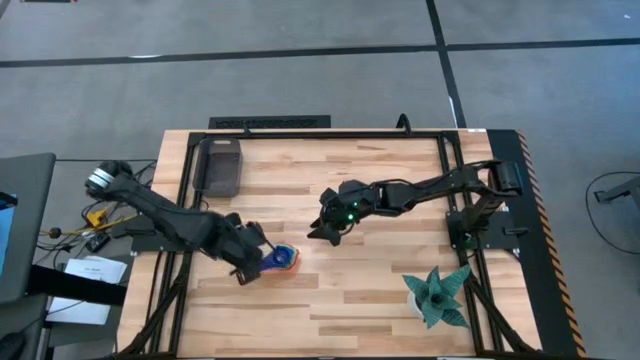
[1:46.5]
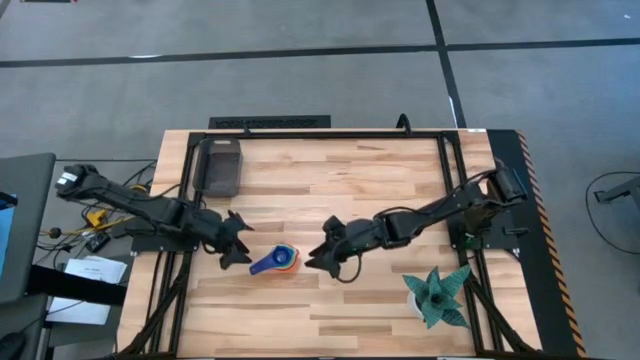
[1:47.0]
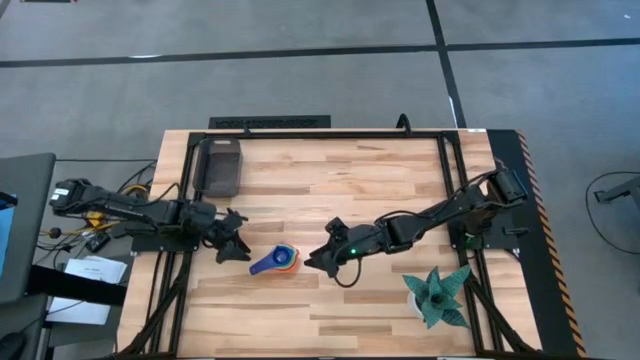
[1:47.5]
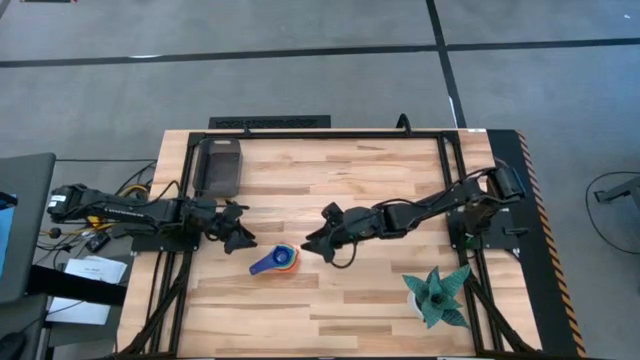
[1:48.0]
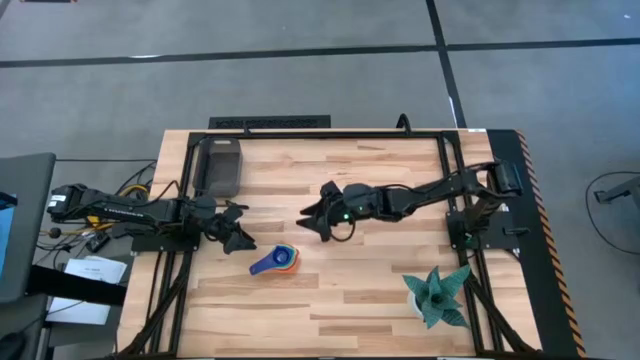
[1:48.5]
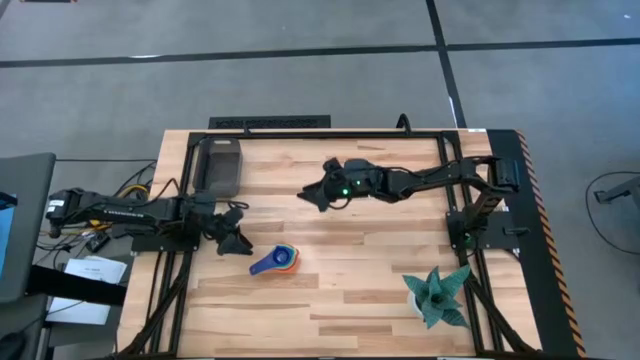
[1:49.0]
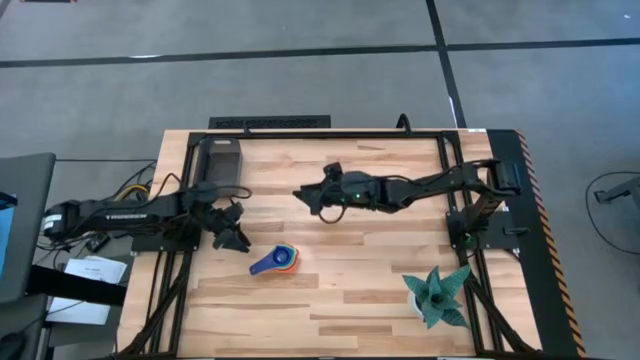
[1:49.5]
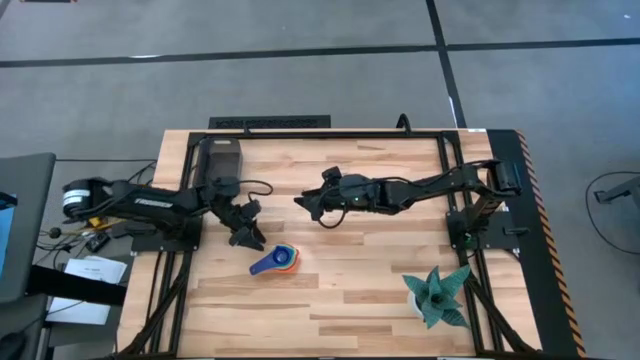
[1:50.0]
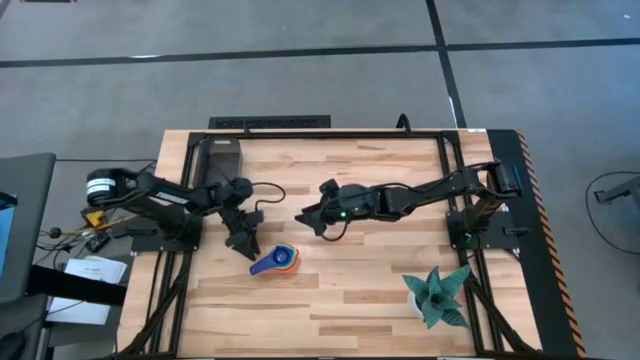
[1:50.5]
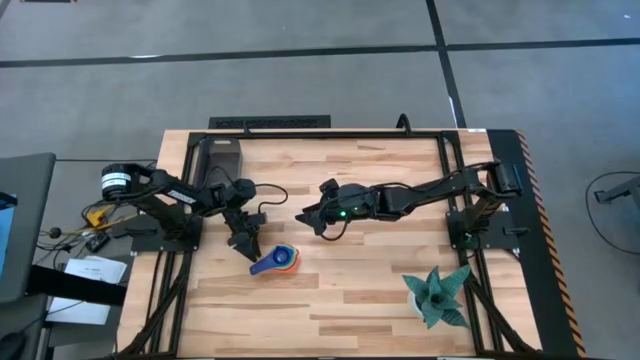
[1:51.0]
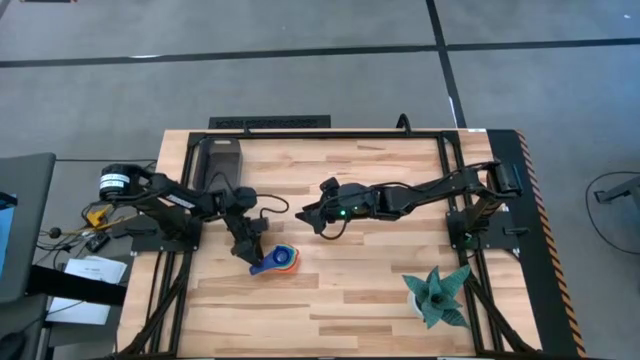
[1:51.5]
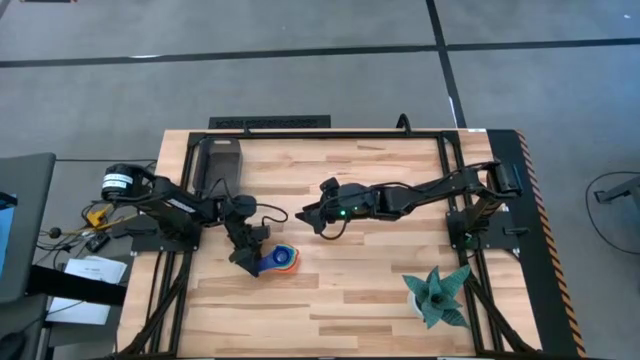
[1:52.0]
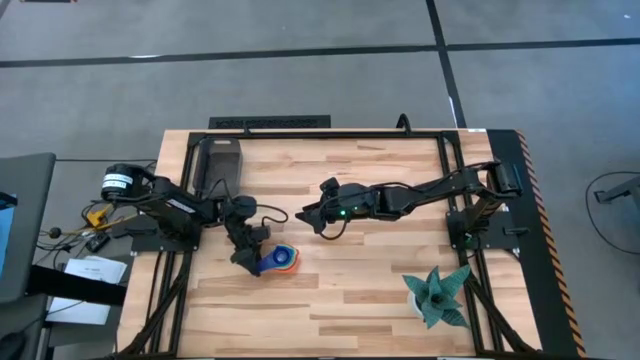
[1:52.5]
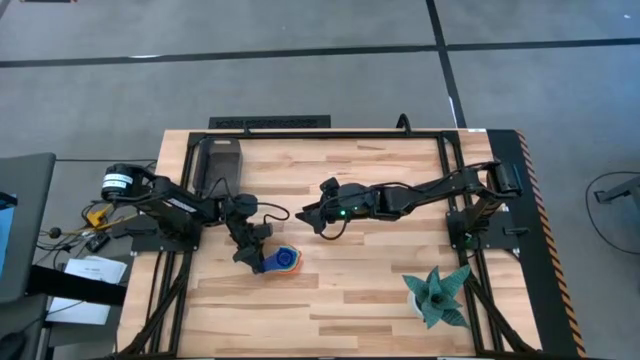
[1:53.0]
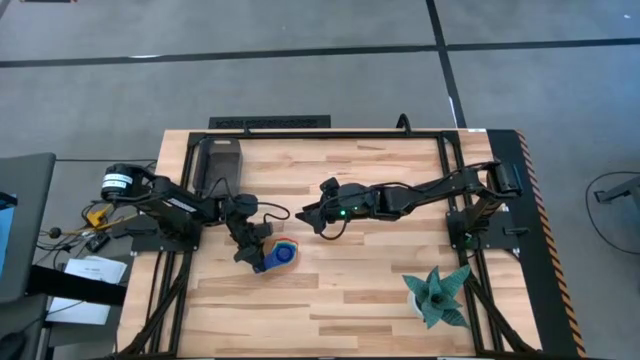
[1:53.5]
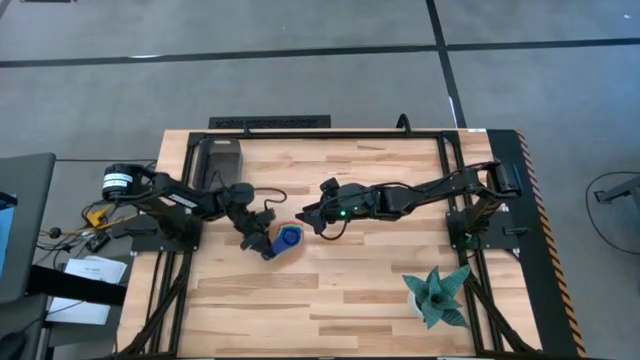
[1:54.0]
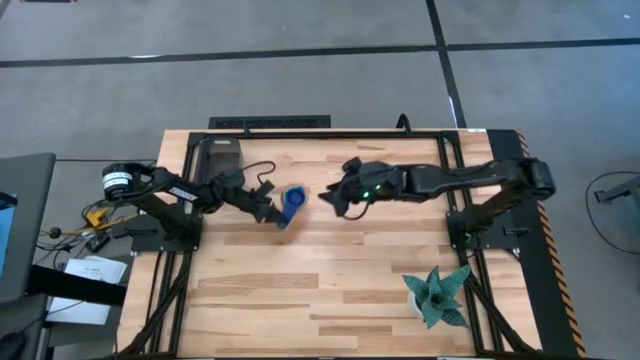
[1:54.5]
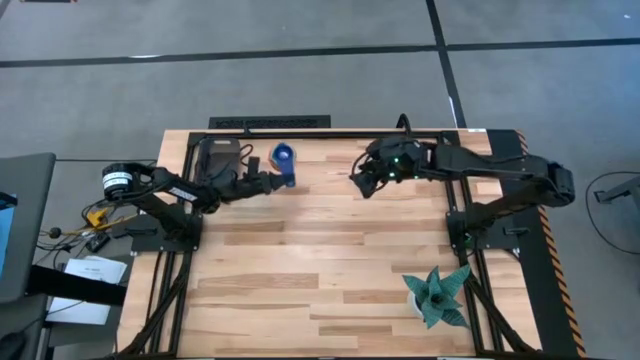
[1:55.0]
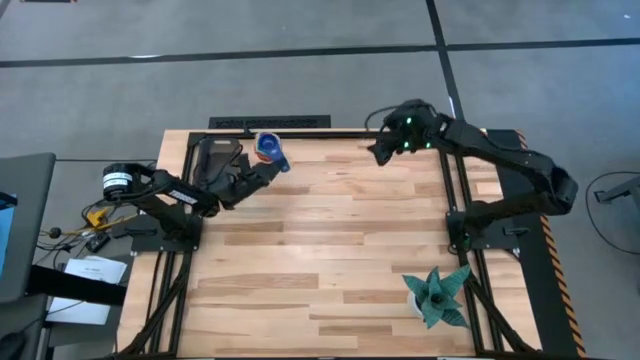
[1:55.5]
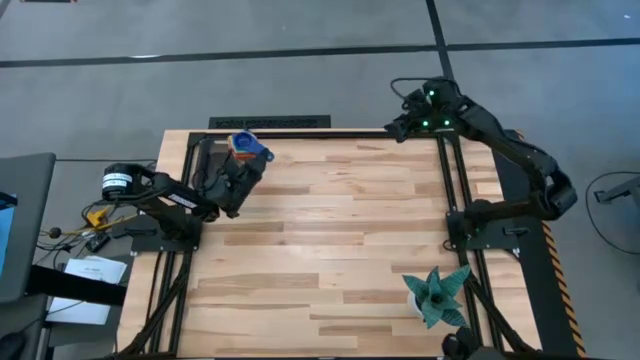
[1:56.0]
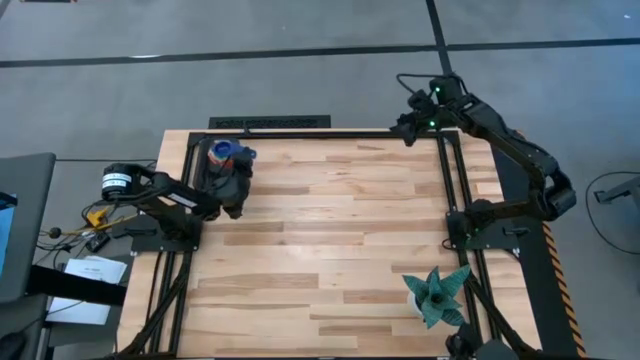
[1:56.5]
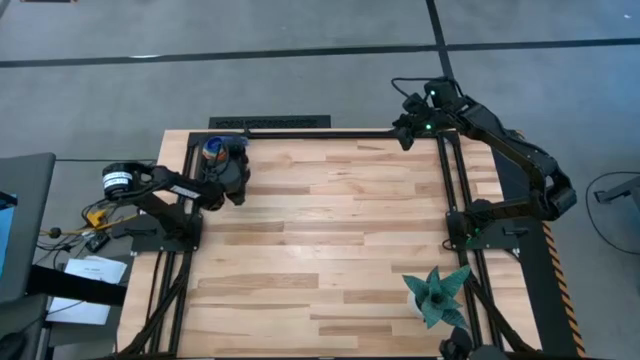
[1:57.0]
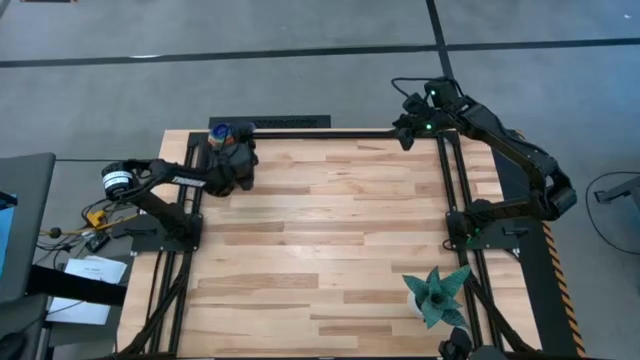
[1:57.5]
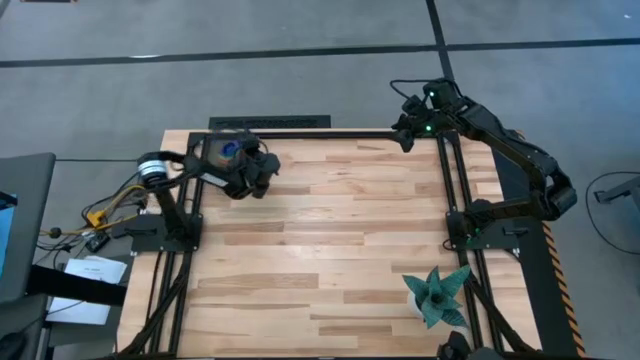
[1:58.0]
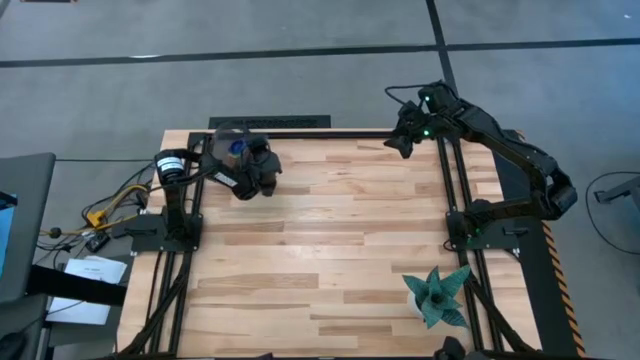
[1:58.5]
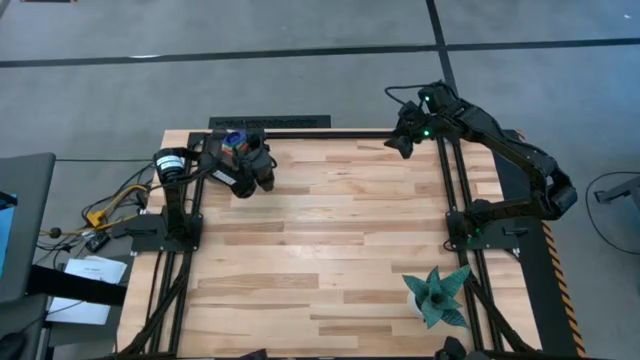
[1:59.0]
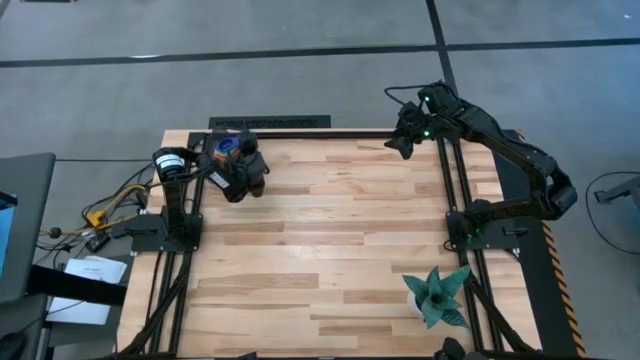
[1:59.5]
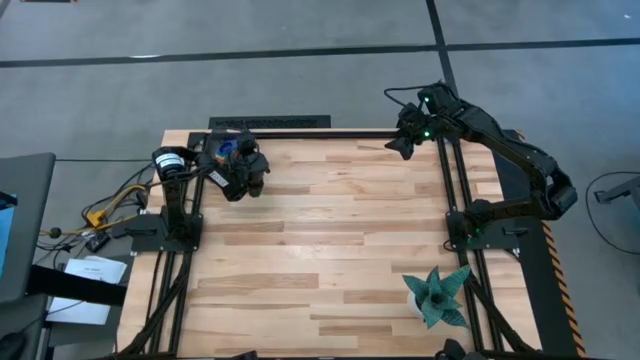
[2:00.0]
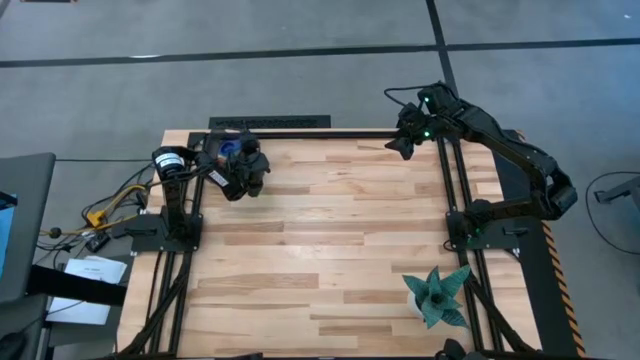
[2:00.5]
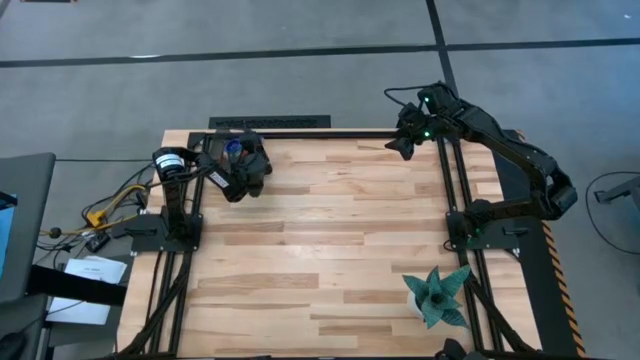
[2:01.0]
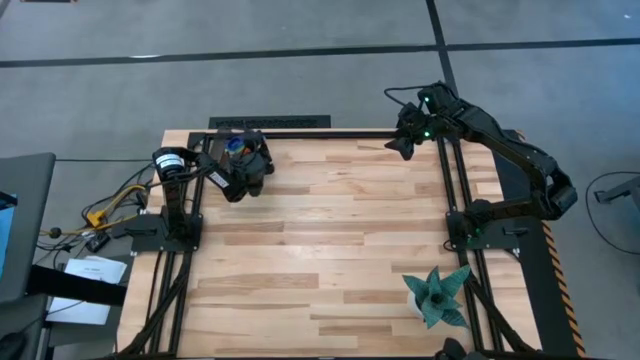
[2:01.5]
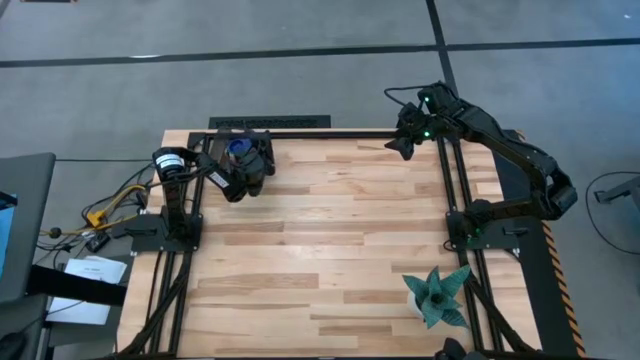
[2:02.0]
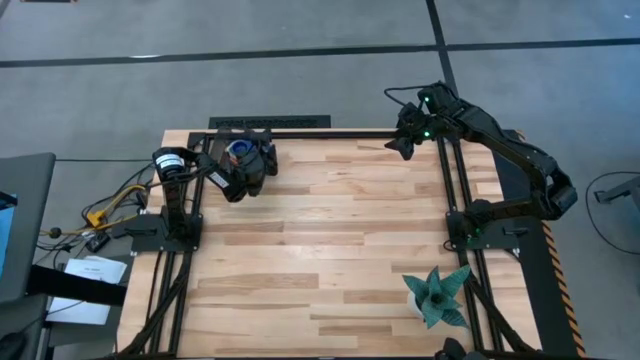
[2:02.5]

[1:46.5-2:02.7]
Task: Nest measuring cups in basket
Put the stacked measuring cups into the black bin

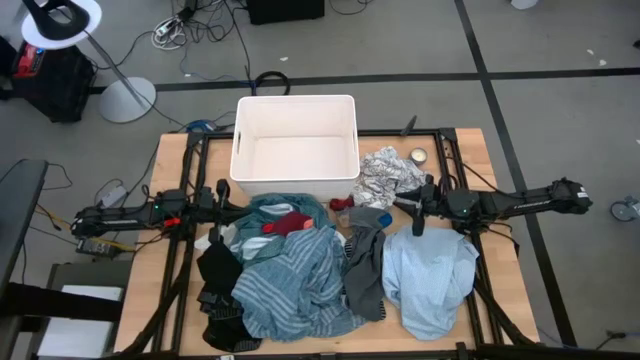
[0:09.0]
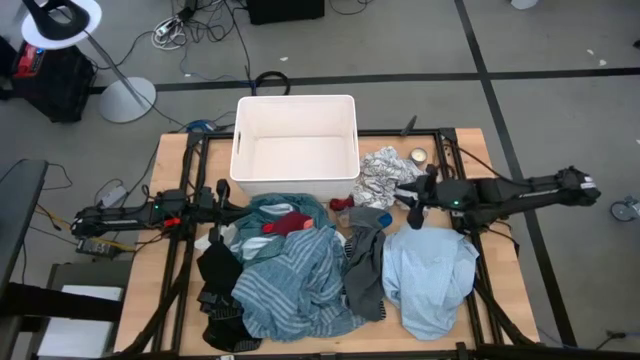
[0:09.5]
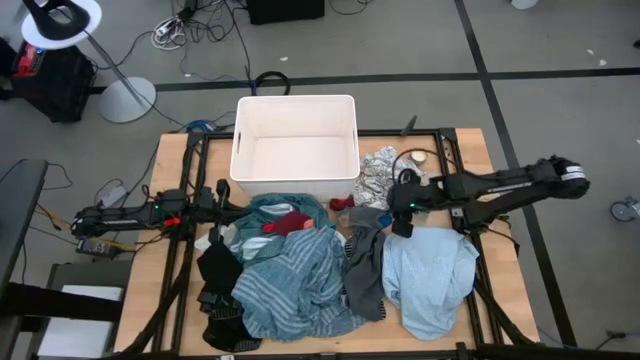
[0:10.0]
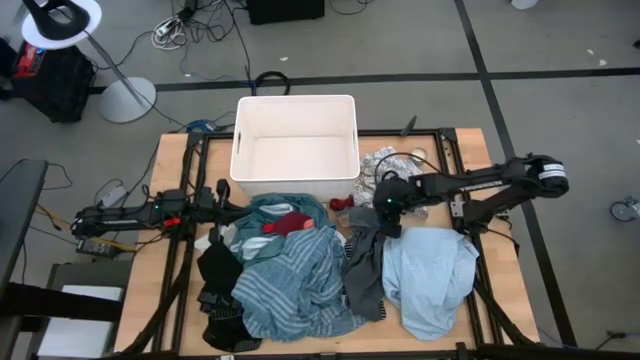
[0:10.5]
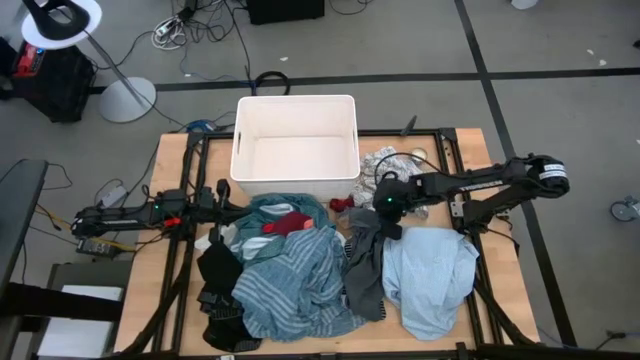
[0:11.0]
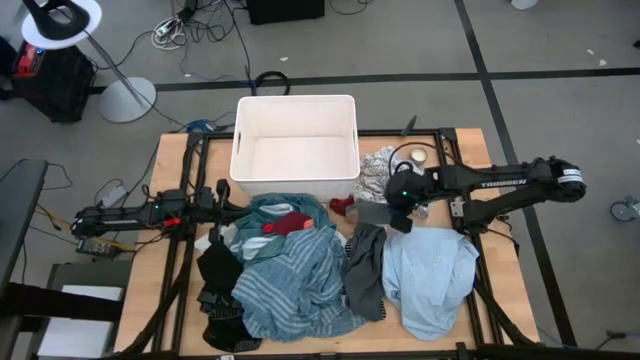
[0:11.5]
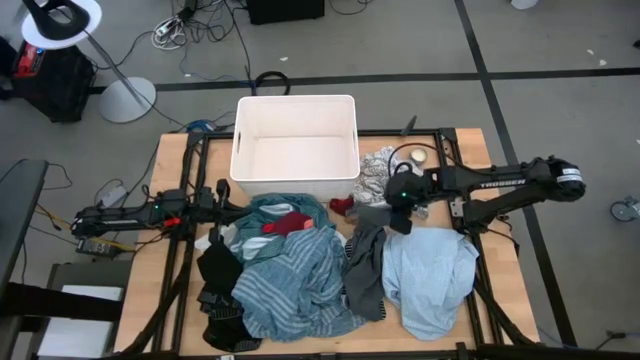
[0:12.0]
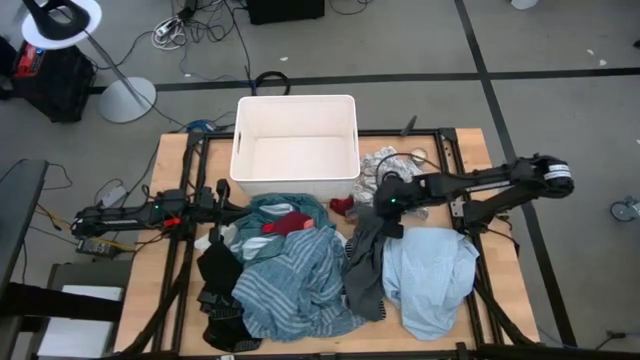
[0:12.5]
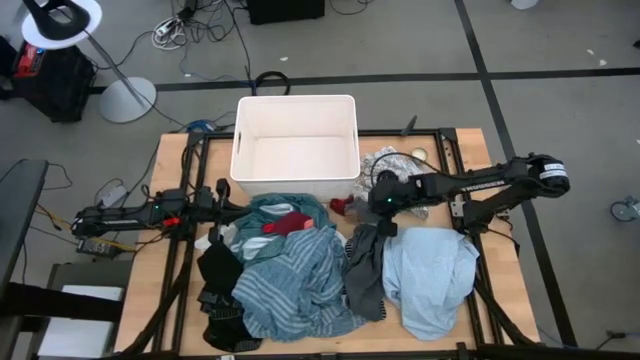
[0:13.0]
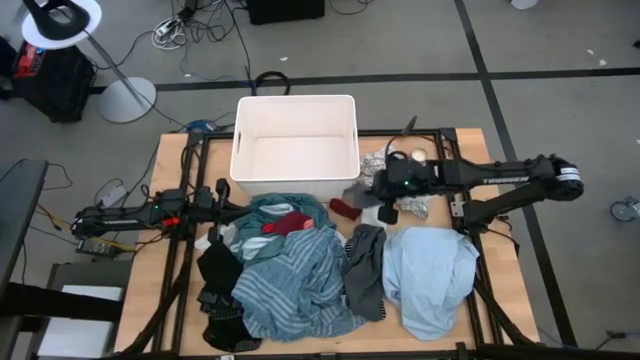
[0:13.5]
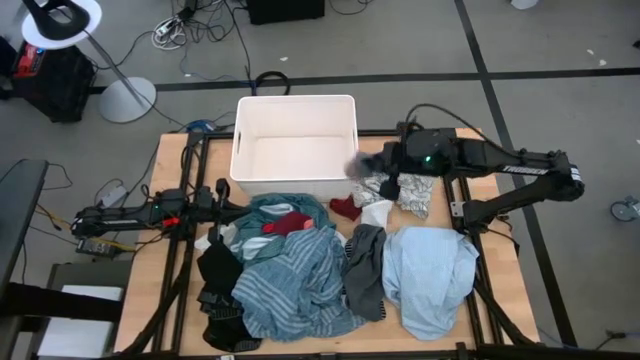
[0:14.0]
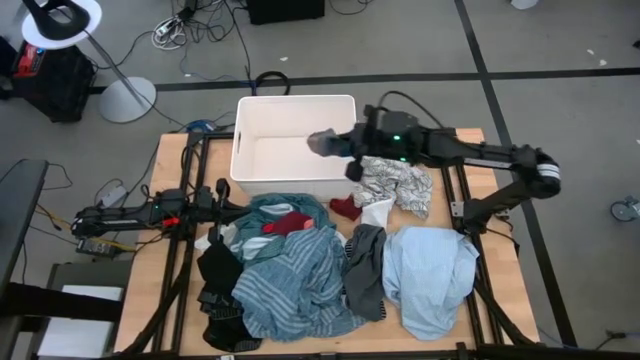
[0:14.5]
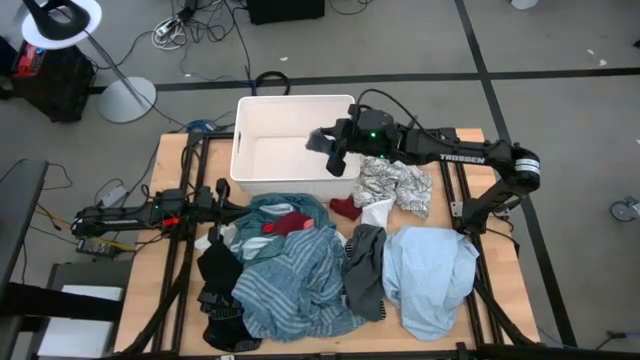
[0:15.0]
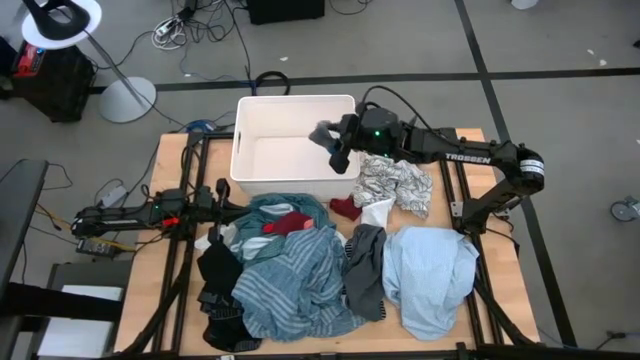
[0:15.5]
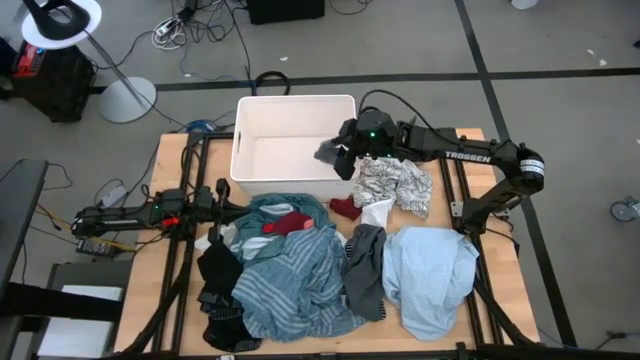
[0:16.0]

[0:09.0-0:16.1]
Task: Sort clothes
Put the gray sock into the white laundry bin
